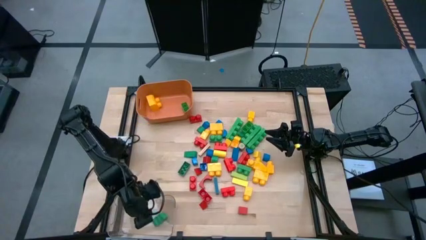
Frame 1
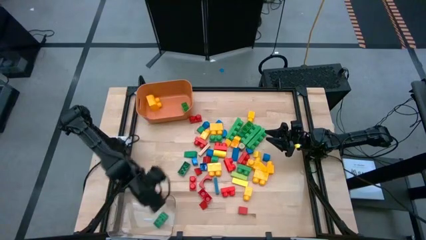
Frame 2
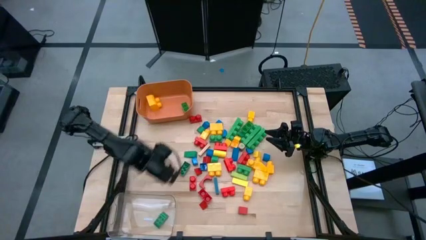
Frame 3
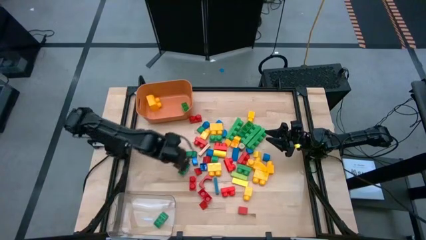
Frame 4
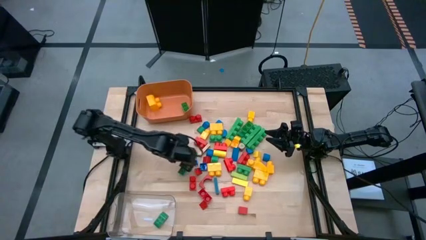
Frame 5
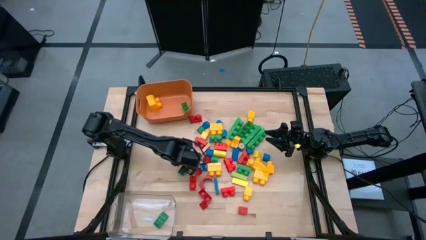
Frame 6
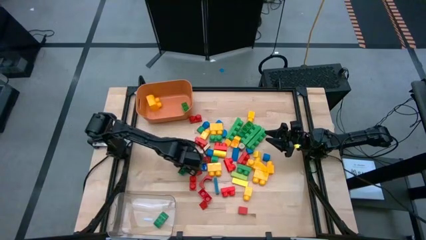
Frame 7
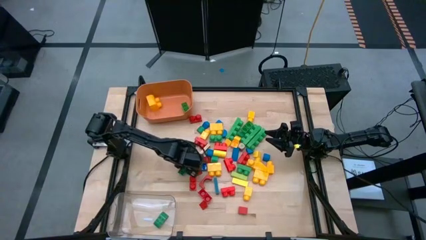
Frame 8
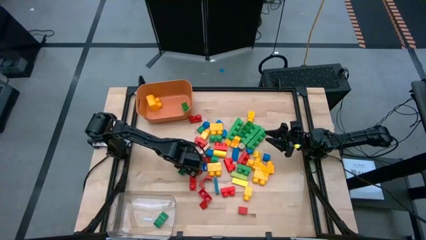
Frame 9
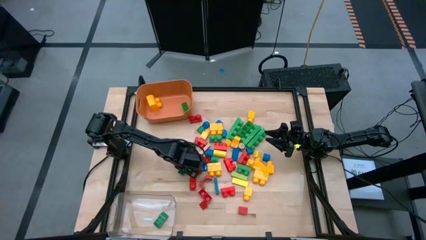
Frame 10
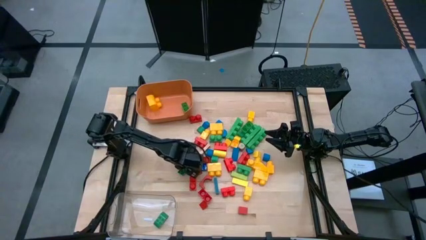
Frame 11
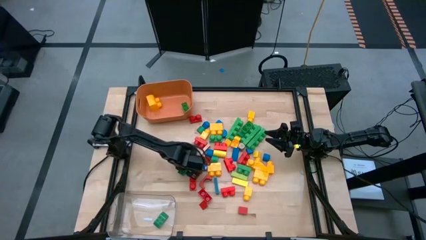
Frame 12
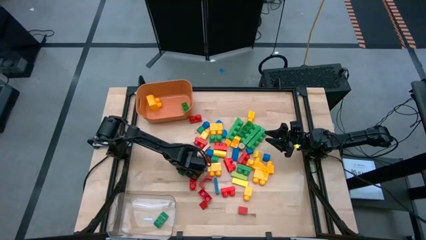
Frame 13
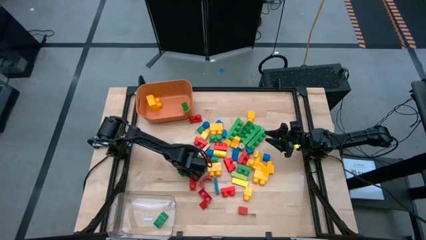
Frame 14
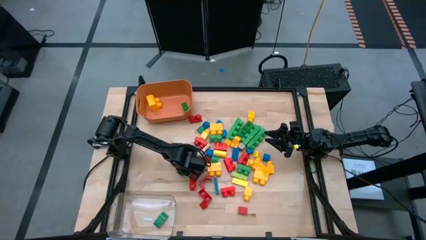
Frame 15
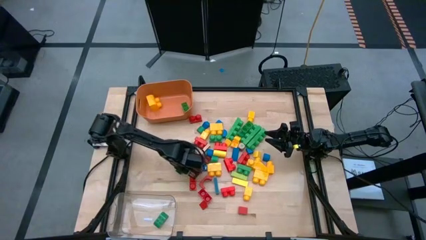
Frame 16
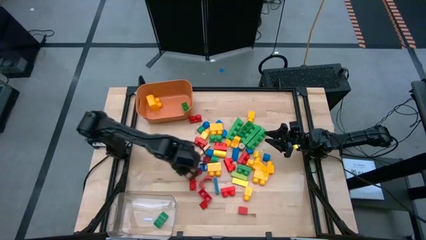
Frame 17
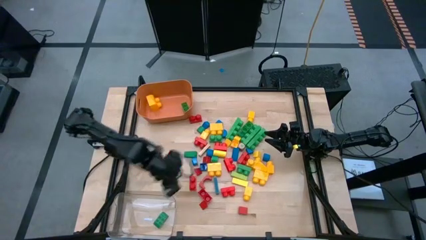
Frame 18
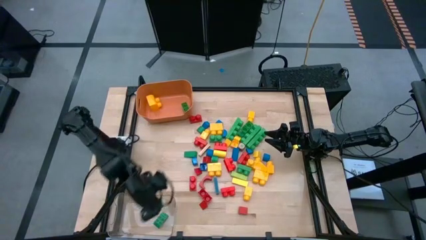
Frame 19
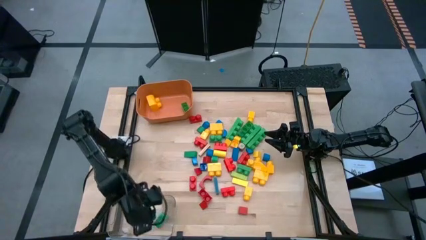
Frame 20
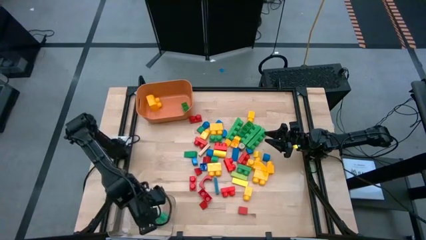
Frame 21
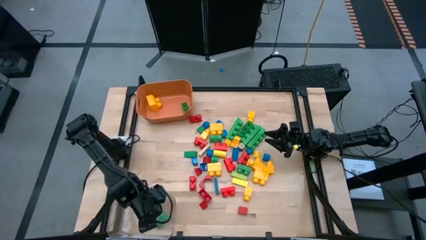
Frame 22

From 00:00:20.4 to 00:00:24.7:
Task: Sort blocks by size
Put the small green game piece into the transparent bin

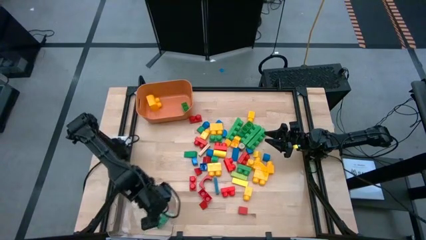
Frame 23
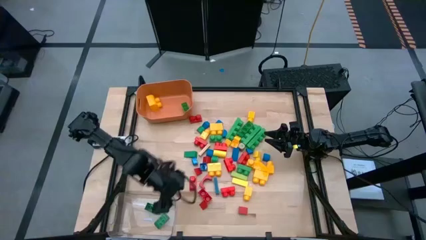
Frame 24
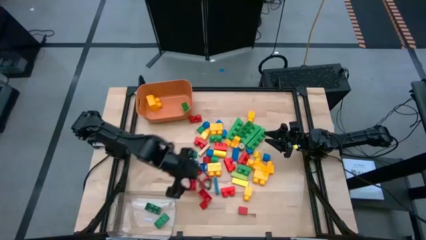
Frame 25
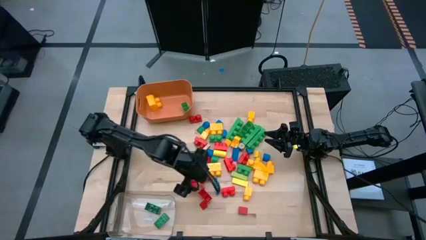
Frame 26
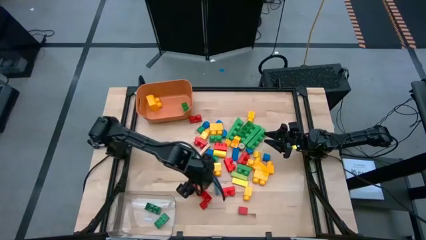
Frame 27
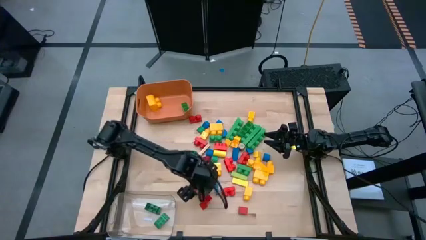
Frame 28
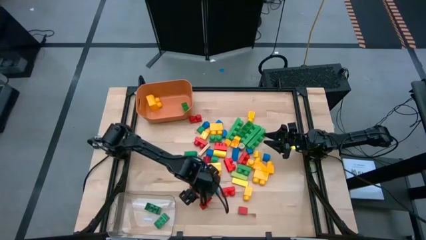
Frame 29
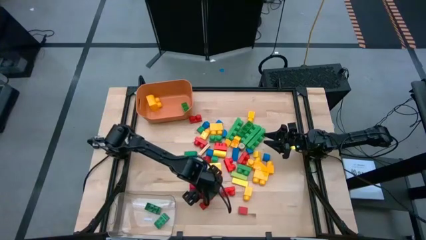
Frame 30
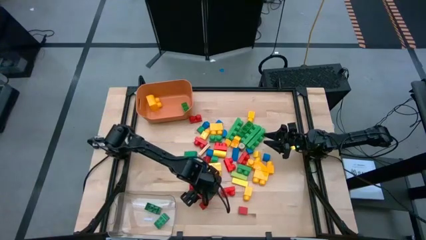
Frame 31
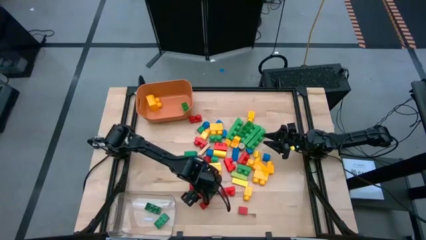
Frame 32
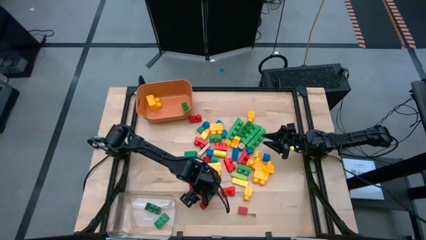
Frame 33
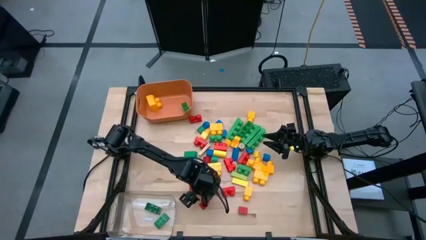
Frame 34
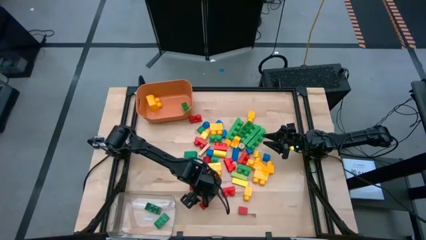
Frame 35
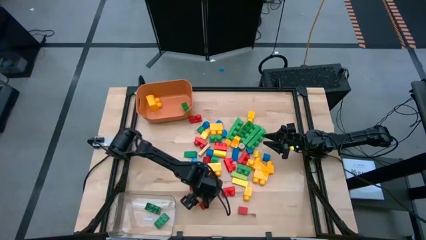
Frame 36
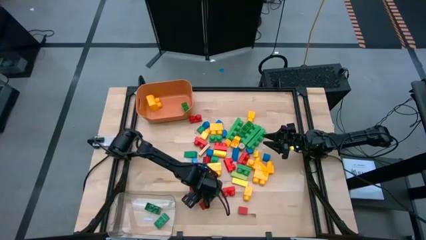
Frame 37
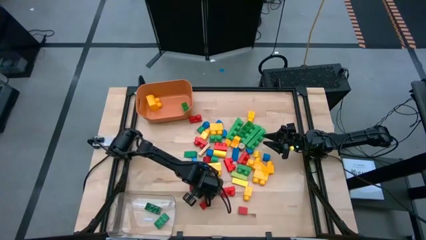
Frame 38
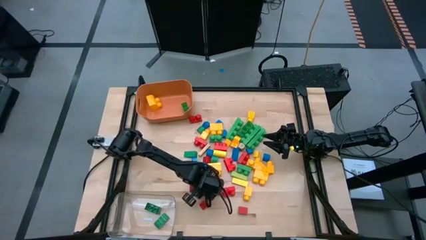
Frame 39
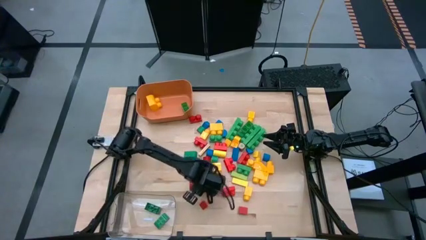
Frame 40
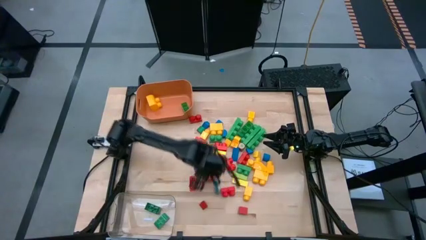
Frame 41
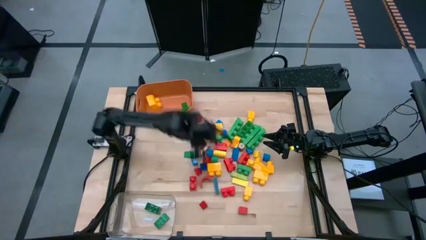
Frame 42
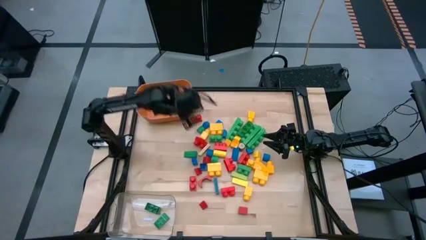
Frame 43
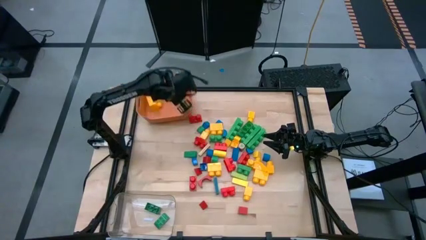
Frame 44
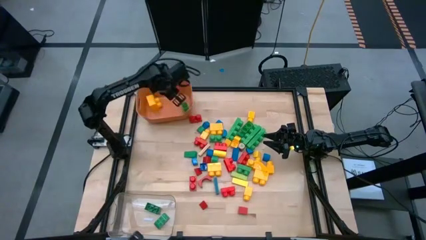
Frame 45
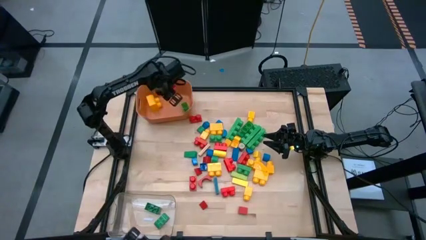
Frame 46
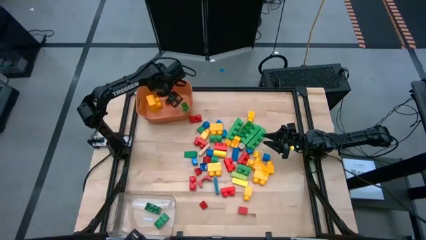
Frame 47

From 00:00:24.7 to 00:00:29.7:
Put the big red game piece into the orange bin

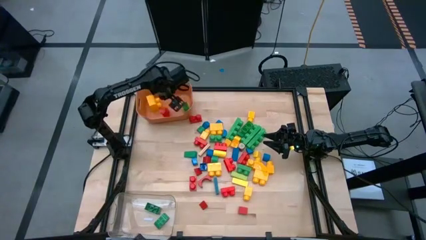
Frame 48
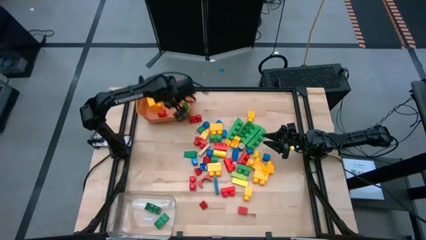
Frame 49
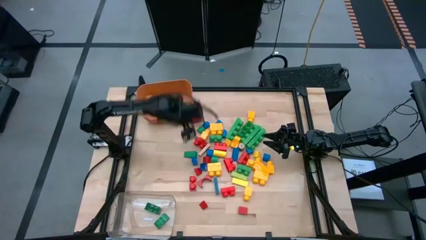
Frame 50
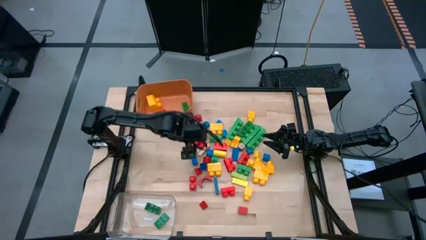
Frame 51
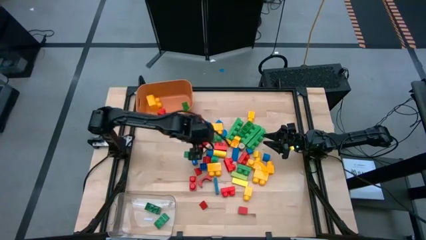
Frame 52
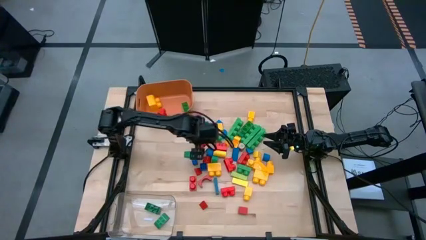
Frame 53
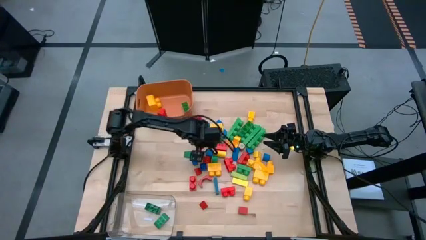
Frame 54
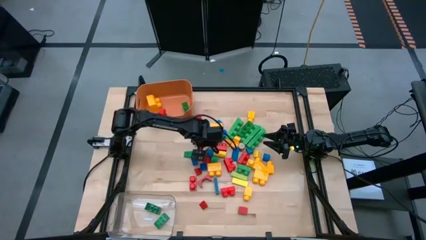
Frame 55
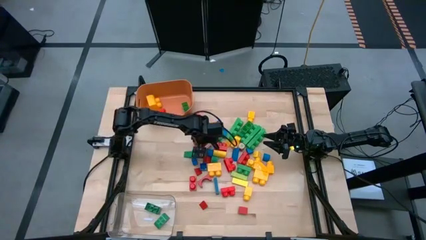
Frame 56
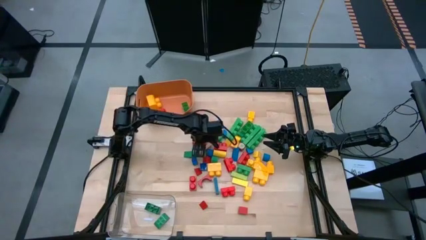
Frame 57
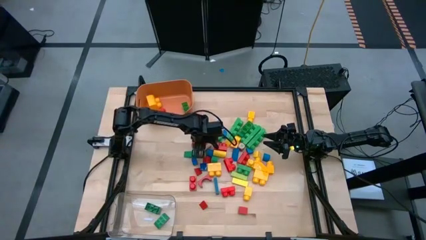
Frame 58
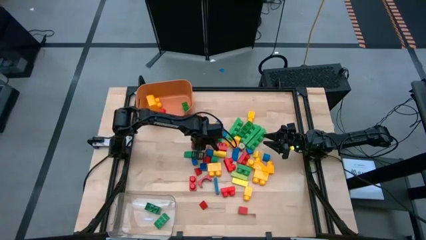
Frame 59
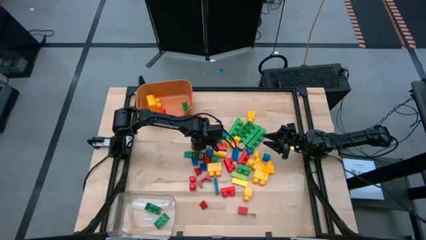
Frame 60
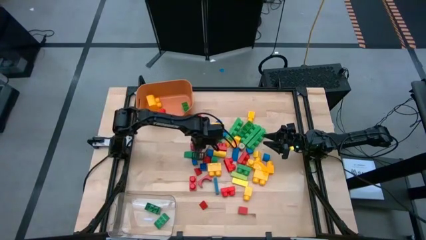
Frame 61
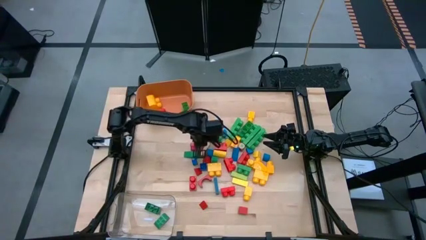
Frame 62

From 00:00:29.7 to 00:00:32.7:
Put the big red game piece into the orange bin

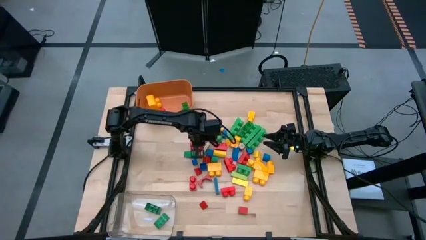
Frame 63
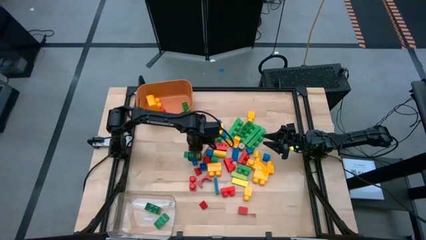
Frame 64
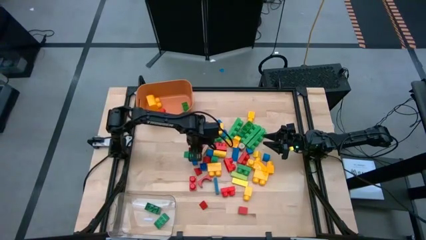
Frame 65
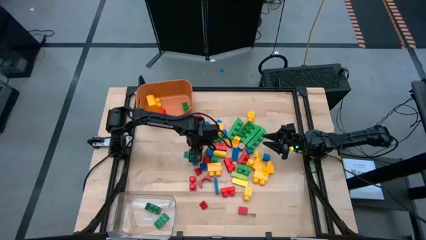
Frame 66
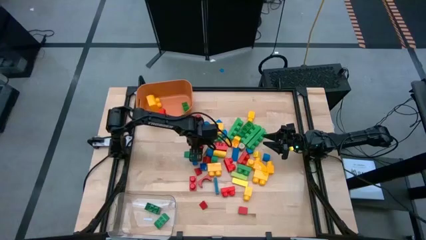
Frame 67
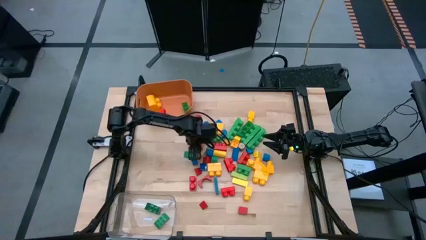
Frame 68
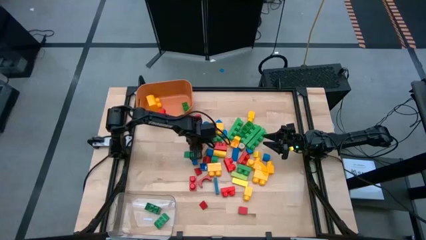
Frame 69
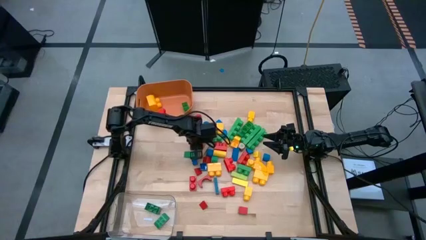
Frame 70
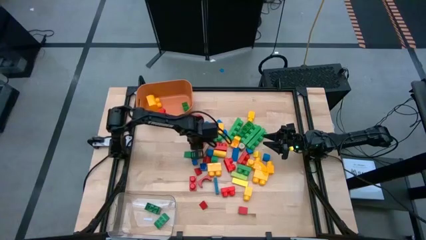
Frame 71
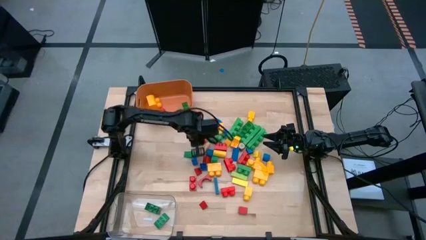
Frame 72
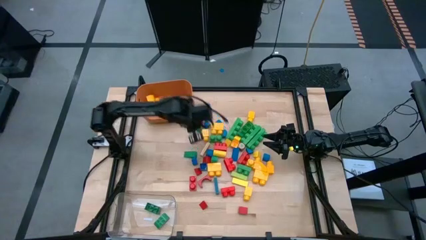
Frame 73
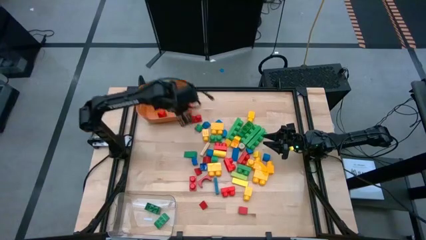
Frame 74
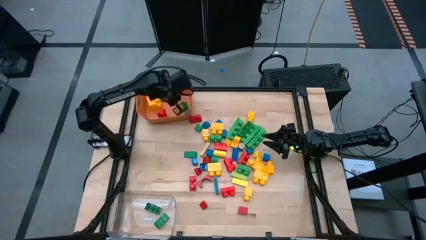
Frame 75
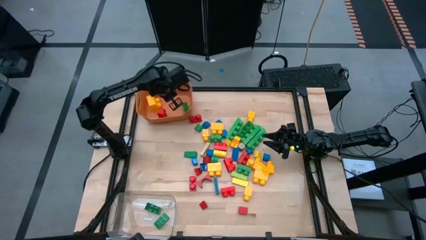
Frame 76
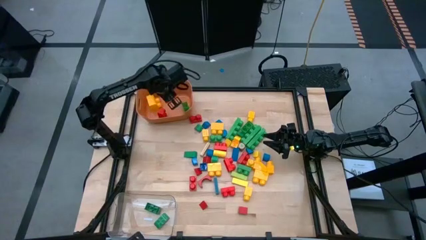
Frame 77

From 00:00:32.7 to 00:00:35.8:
Put the big red game piece into the orange bin

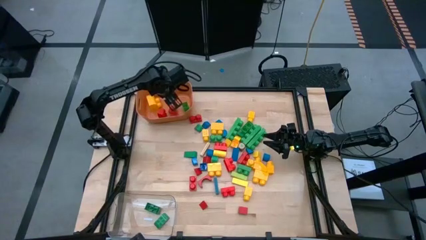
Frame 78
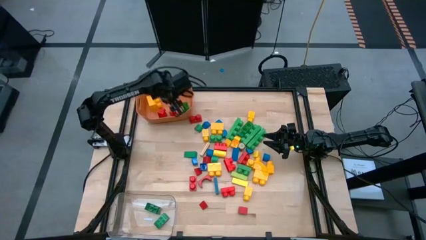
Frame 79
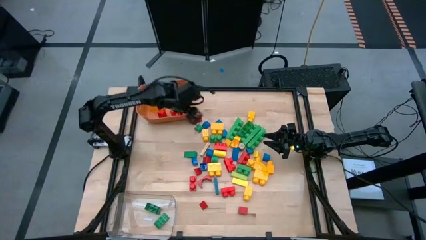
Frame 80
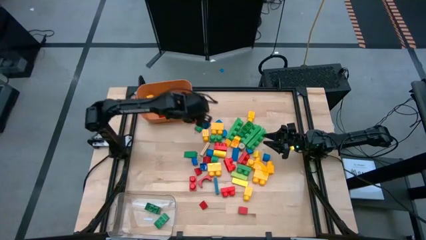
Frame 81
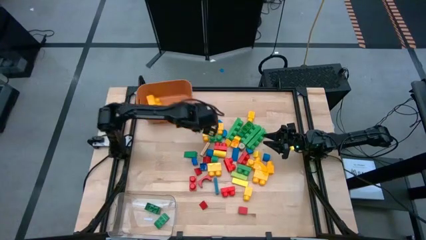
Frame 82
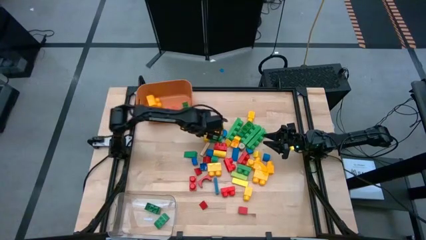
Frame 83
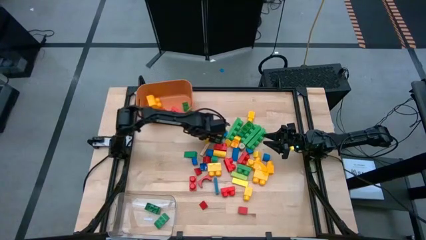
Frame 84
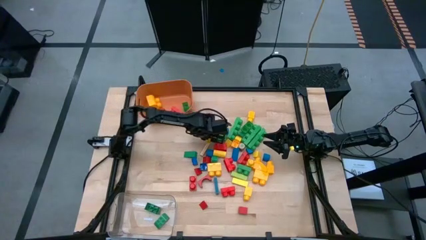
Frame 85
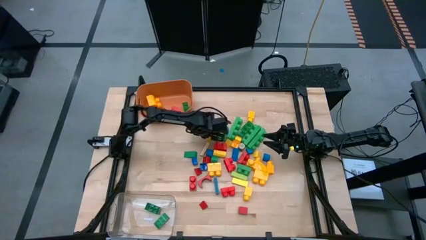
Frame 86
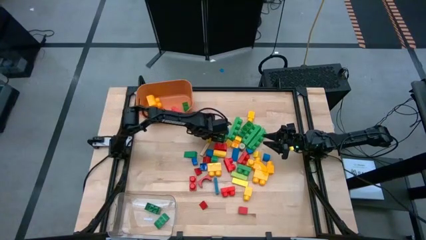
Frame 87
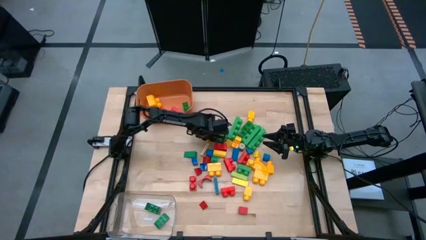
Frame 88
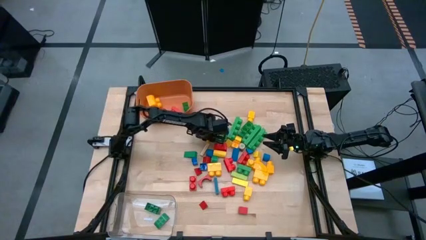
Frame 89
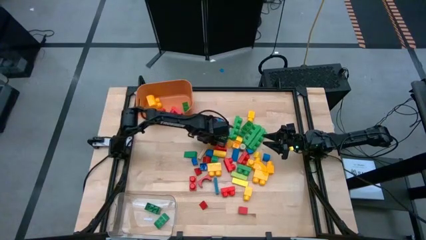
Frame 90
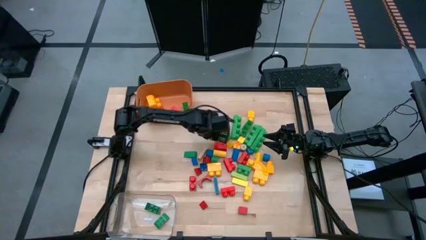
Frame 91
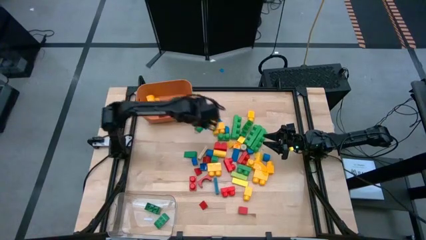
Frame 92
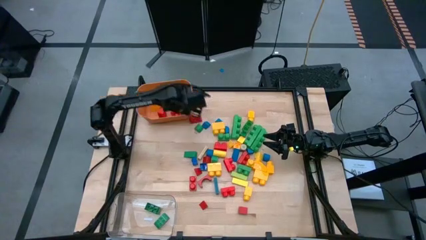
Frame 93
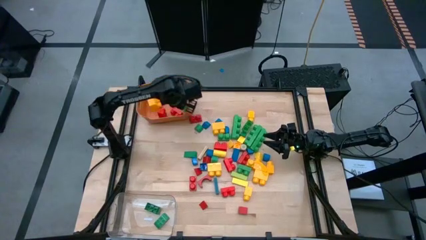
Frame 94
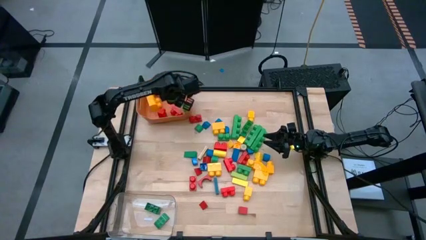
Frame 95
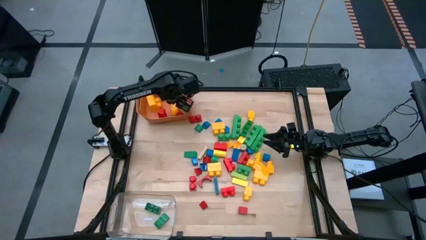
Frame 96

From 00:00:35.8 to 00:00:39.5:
Put the big yellow game piece into the orange bin
